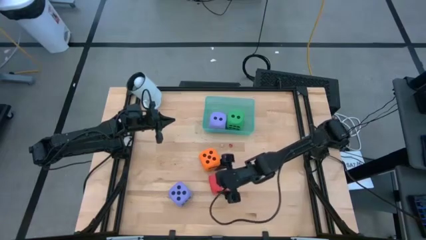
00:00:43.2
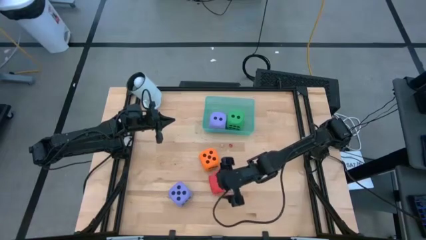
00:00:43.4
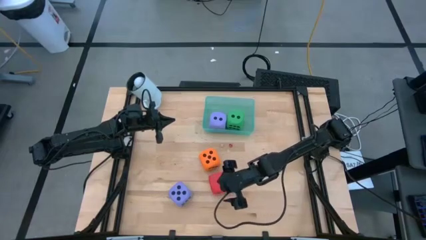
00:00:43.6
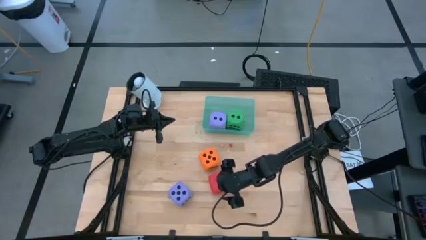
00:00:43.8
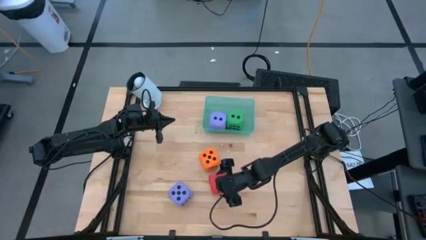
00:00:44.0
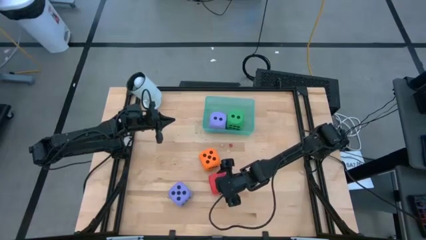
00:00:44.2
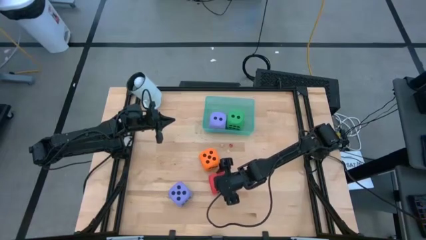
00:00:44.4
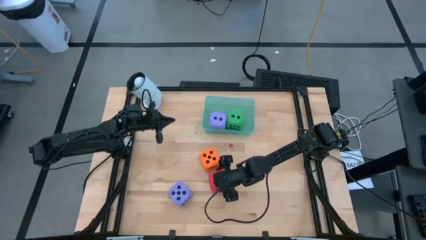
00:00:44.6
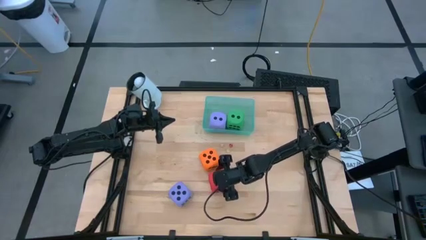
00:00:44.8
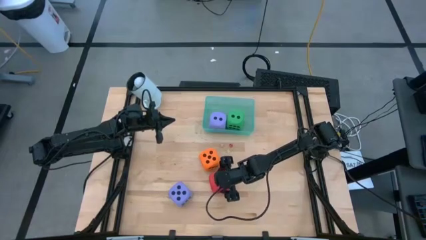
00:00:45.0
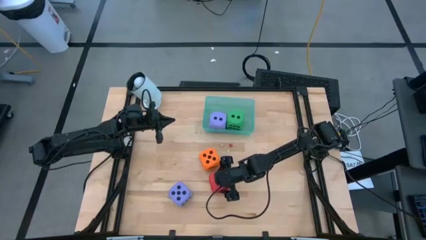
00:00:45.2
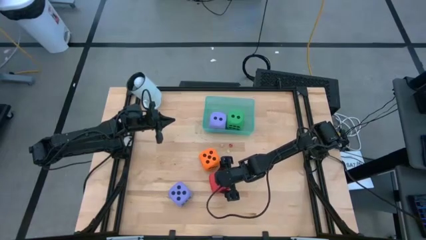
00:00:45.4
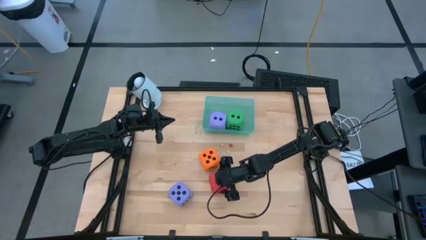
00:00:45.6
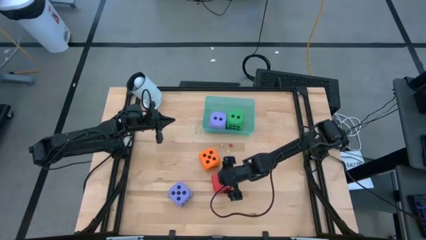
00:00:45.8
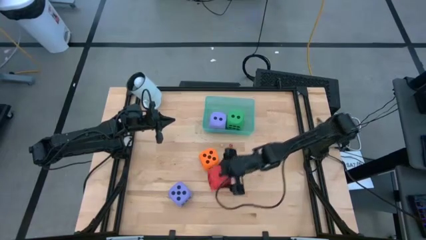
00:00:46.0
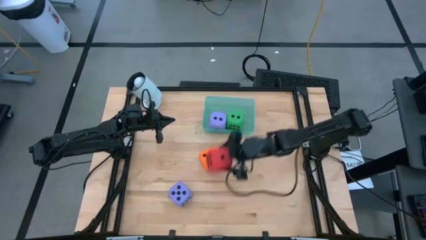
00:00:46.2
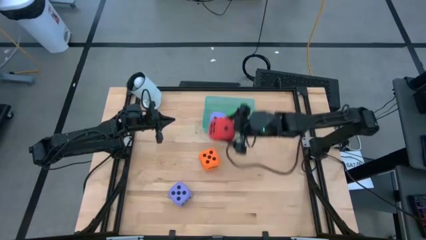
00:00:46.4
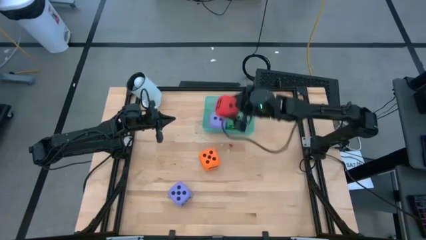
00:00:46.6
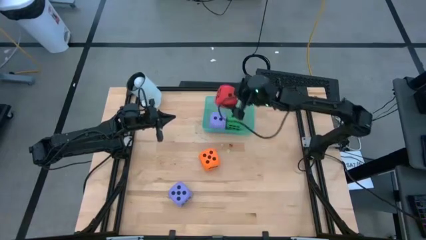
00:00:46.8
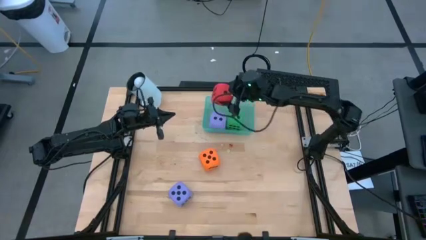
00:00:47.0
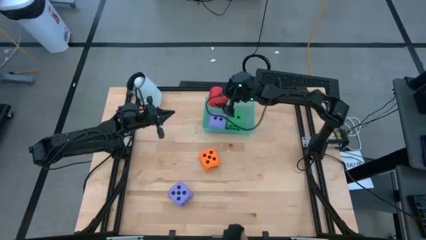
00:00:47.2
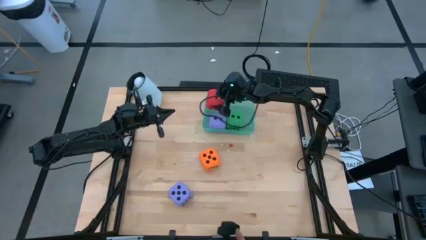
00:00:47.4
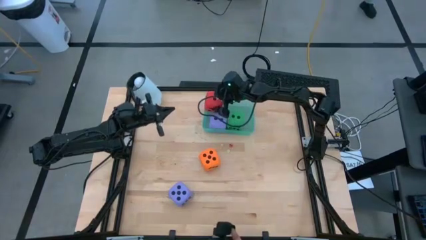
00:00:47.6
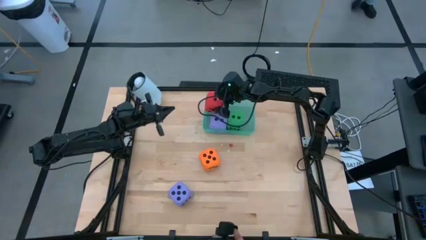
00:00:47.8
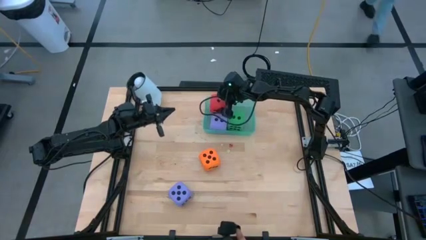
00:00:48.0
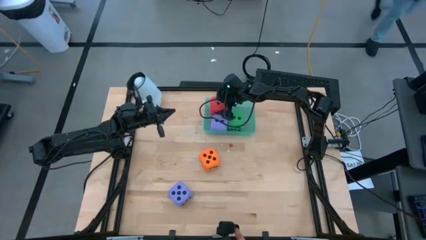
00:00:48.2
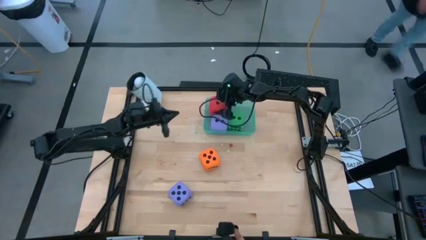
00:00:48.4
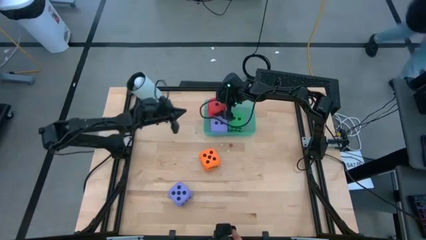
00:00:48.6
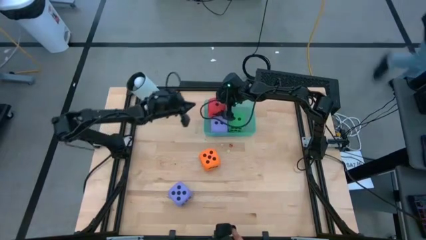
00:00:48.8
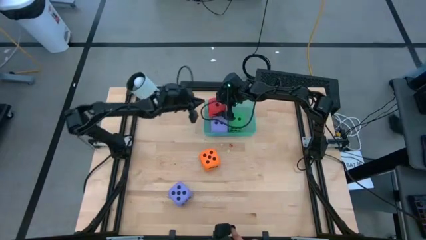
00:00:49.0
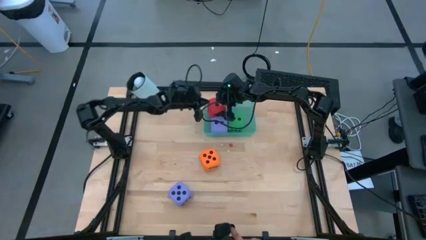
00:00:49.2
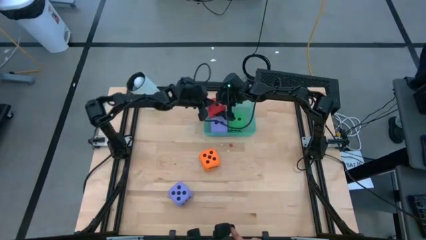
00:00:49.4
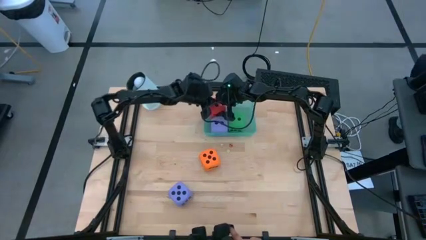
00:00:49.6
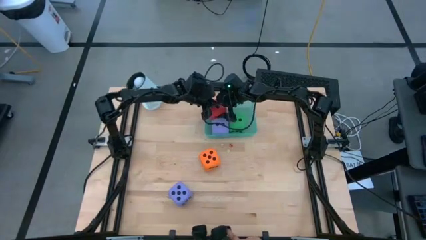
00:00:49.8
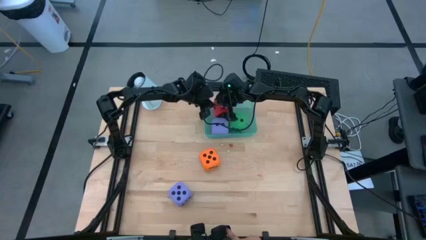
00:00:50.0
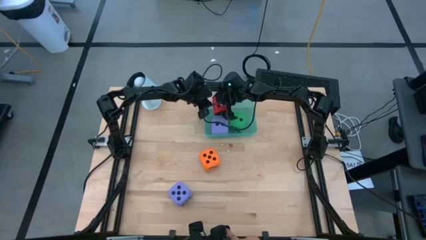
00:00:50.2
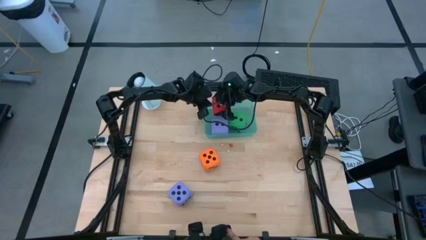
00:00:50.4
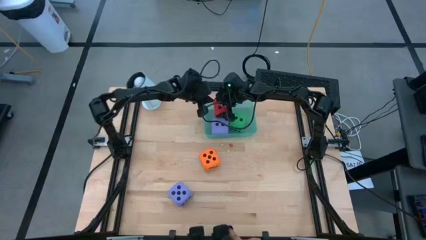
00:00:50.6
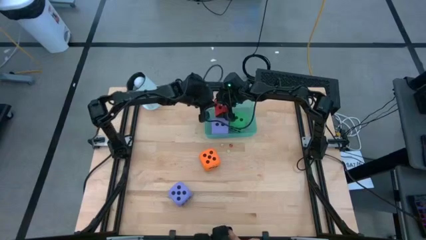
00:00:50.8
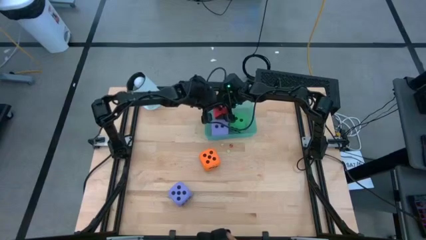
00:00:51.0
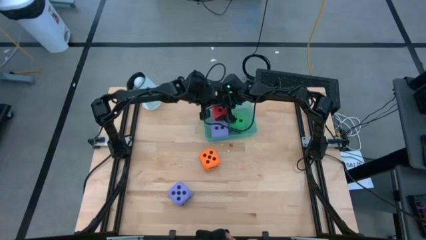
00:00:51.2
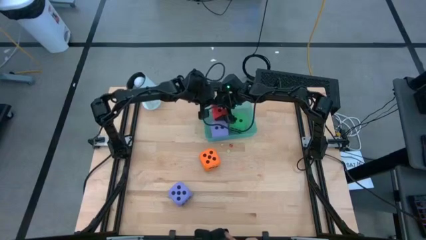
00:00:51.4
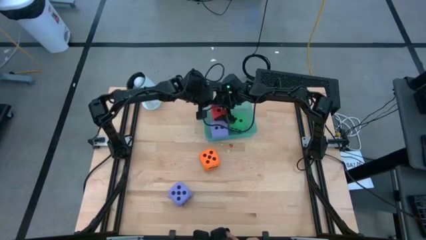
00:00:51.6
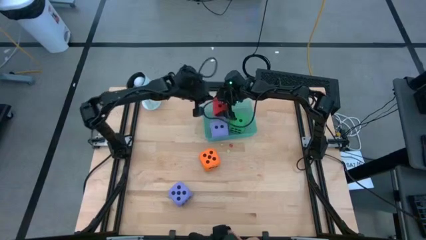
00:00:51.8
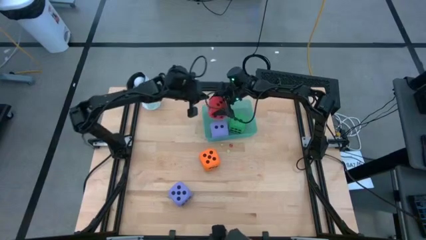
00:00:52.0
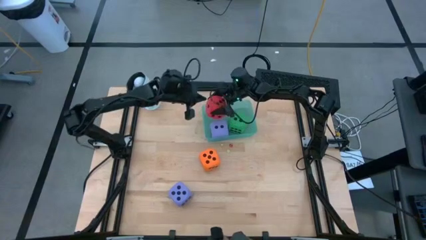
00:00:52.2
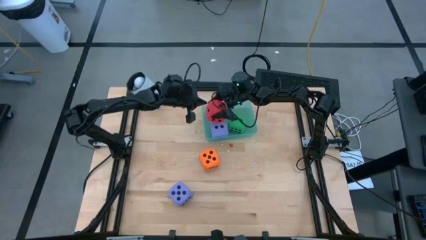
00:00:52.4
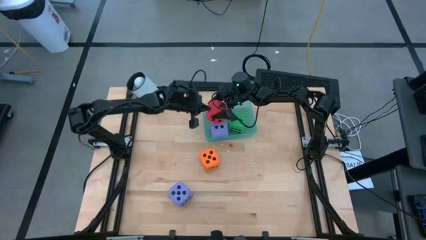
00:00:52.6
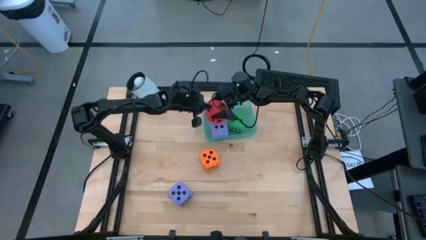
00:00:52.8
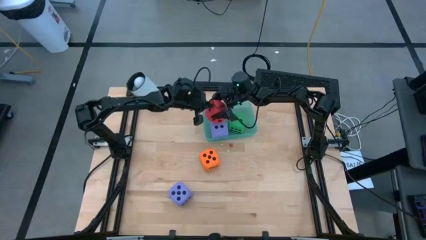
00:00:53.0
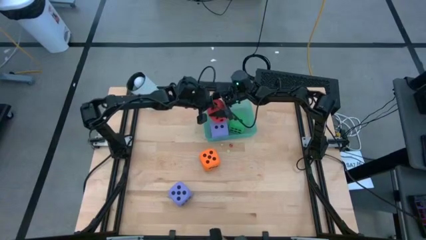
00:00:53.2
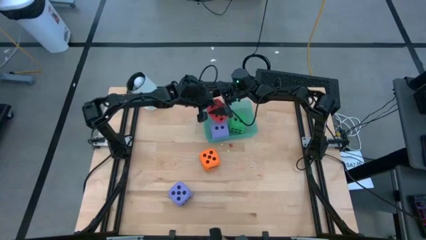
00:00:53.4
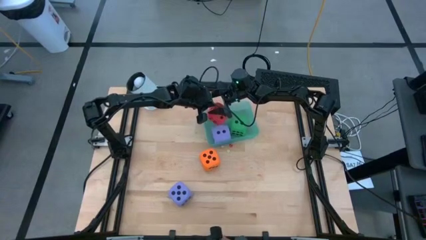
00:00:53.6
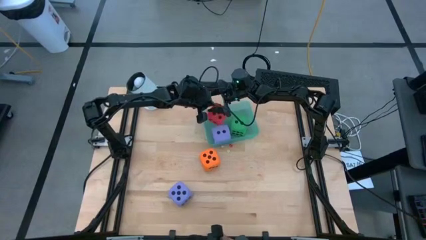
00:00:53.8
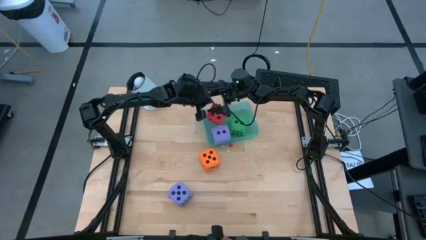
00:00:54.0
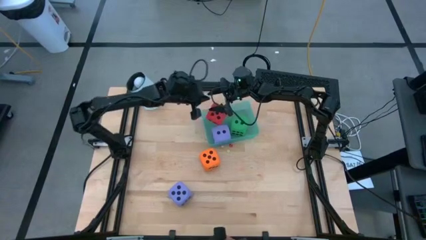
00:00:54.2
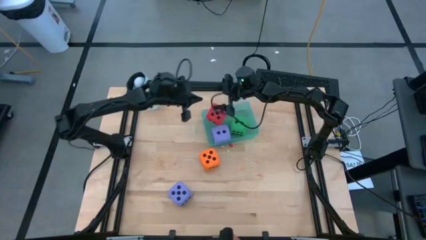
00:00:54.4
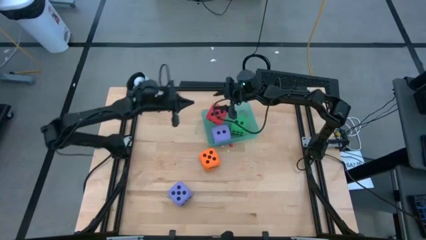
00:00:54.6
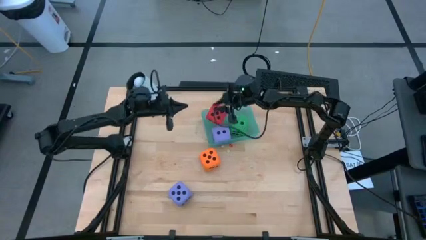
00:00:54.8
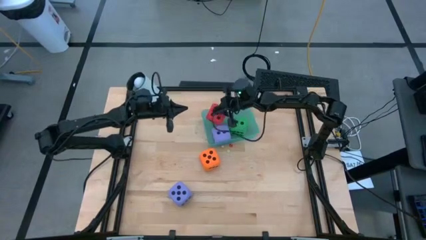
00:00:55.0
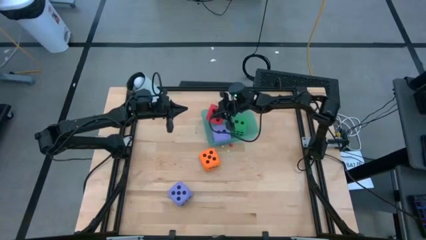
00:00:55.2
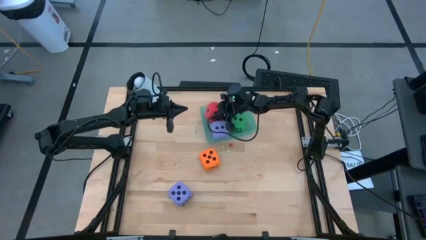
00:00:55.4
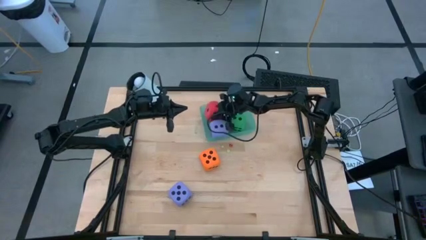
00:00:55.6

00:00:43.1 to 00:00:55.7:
Task: Pick & Place Dice
Put the large red dice into the light blue bin
